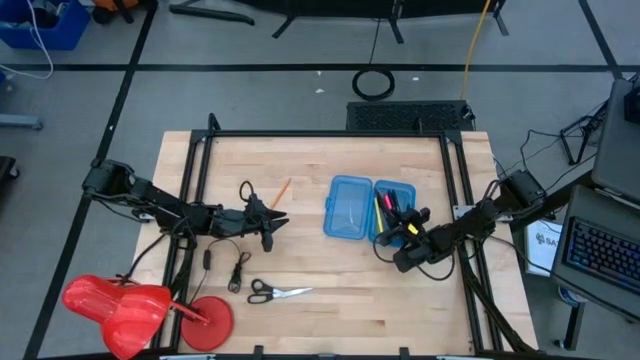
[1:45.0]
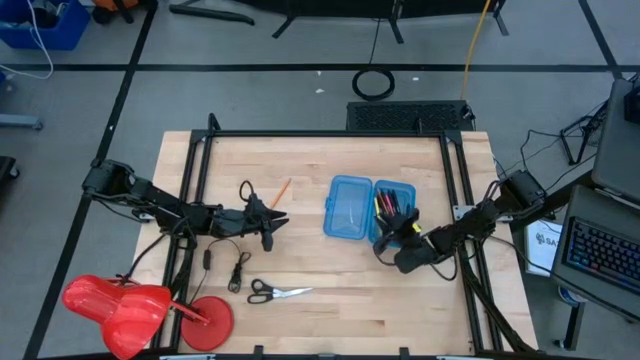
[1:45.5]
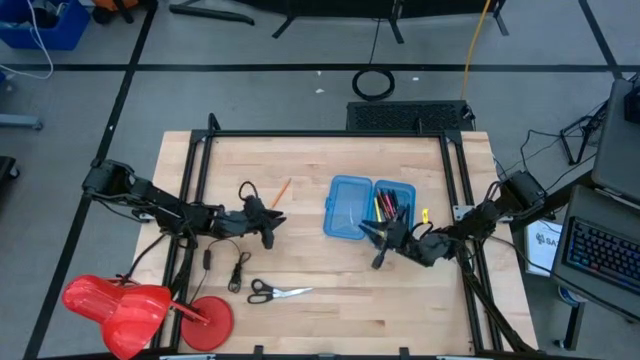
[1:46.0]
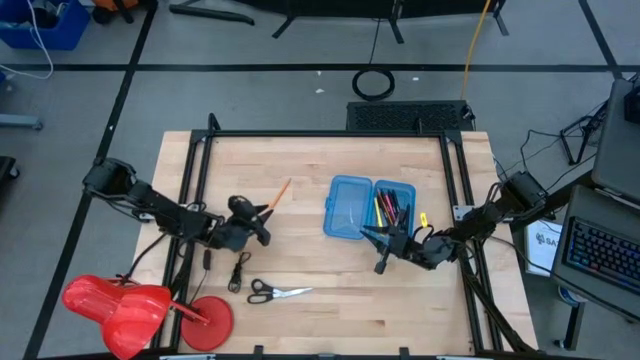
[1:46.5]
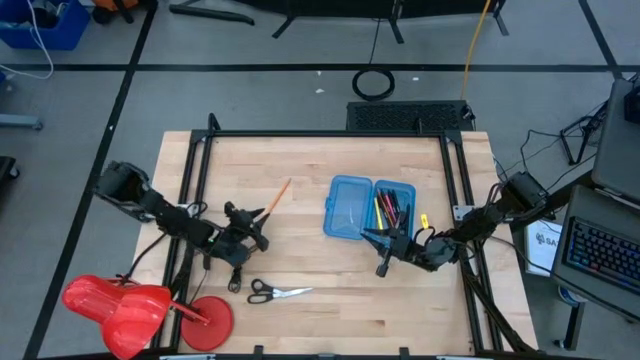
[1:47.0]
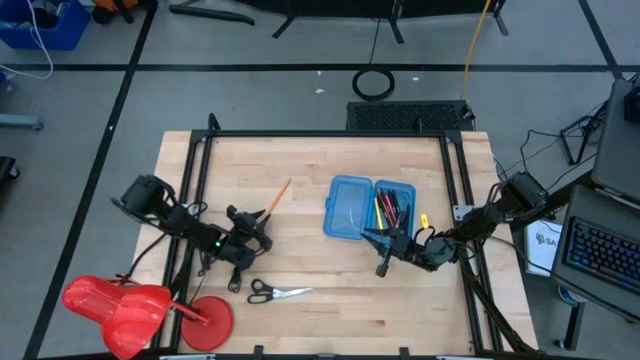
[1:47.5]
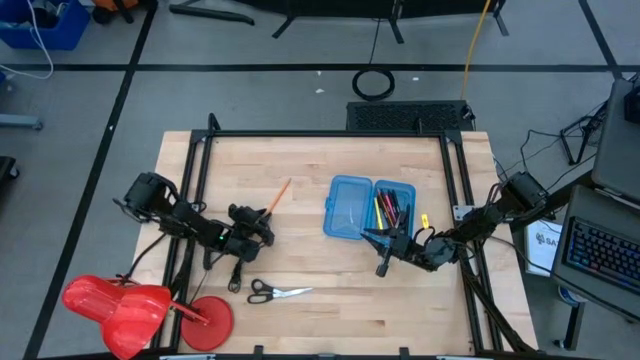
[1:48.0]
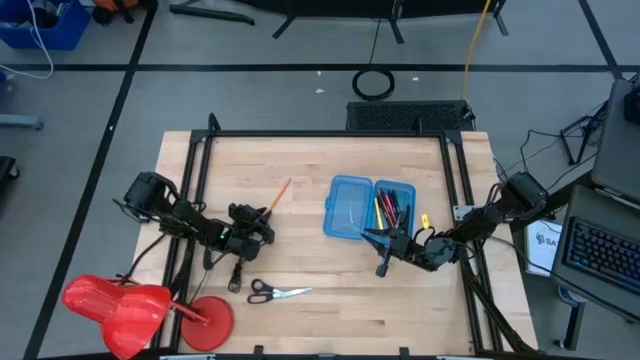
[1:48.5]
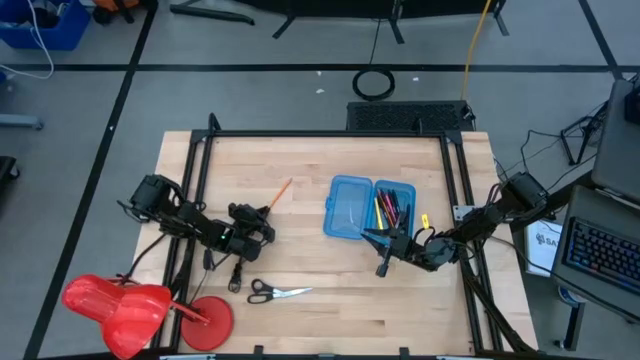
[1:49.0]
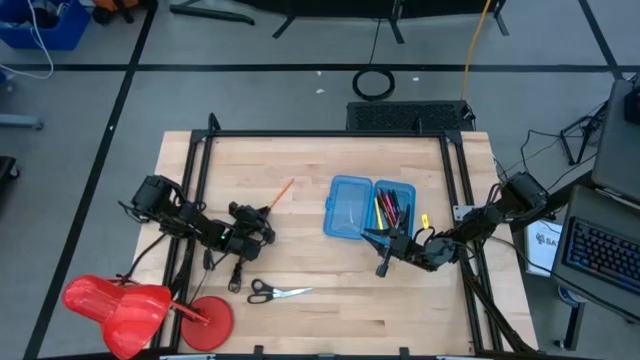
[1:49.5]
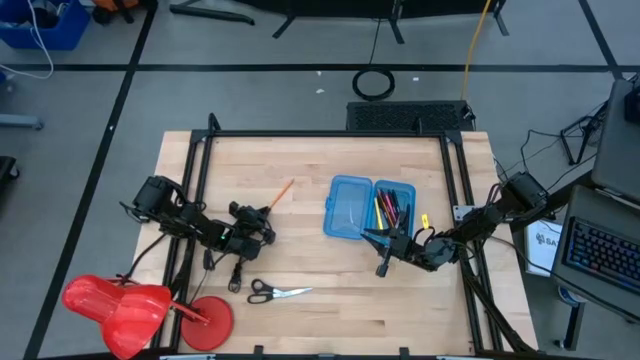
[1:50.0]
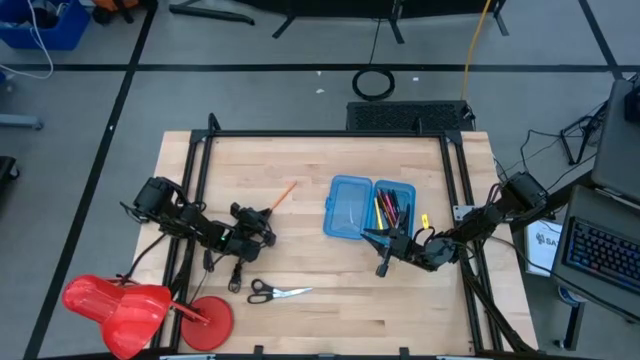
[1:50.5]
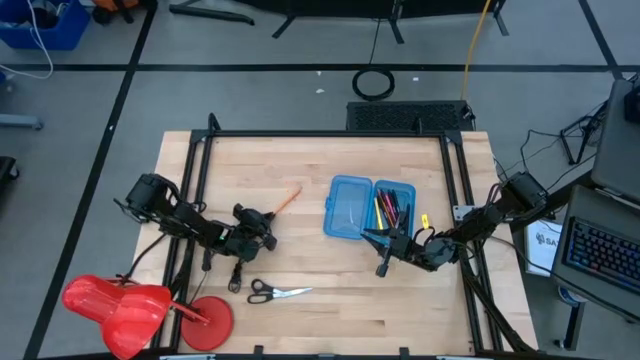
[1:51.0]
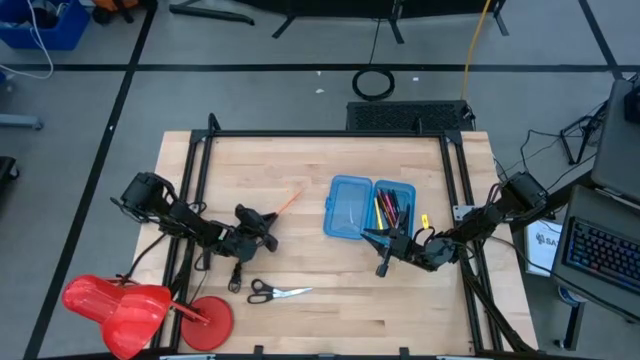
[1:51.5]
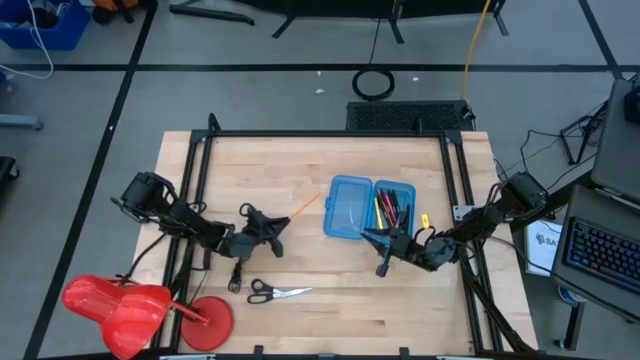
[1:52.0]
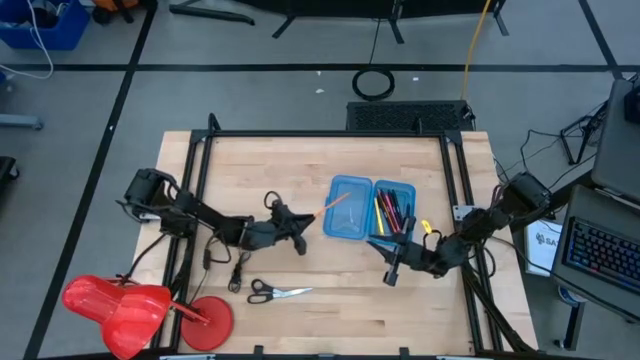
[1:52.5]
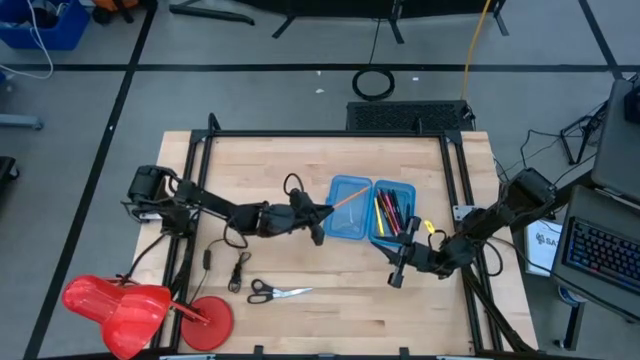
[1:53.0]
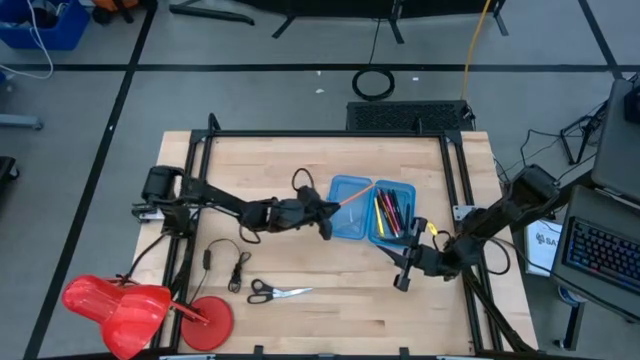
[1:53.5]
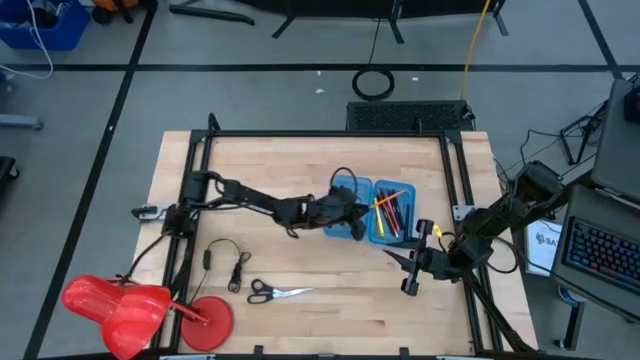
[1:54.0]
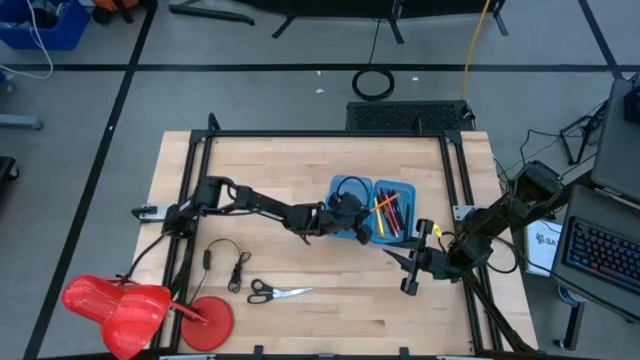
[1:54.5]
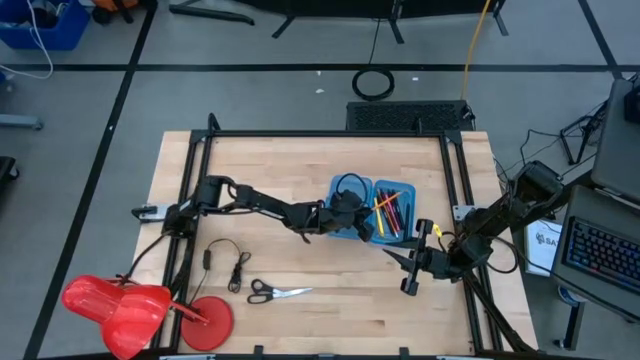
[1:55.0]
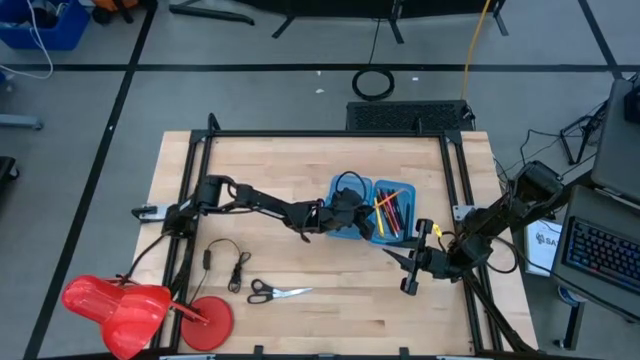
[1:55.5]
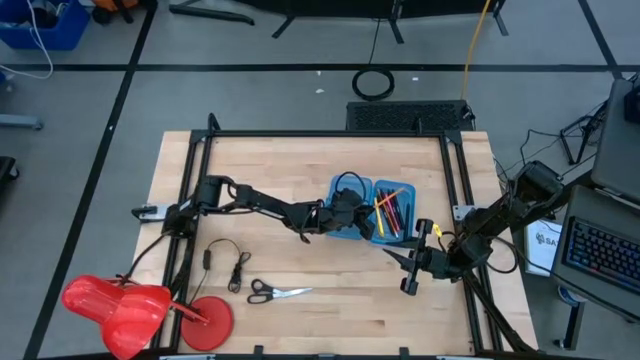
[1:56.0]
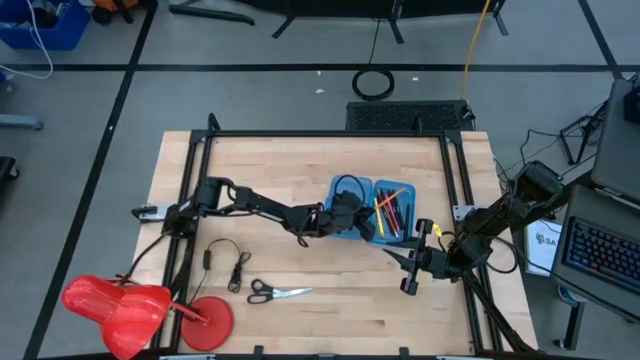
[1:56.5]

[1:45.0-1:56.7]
Task: Pick & place school supplies into a supply box
Put the orange pencil into the blue supply box

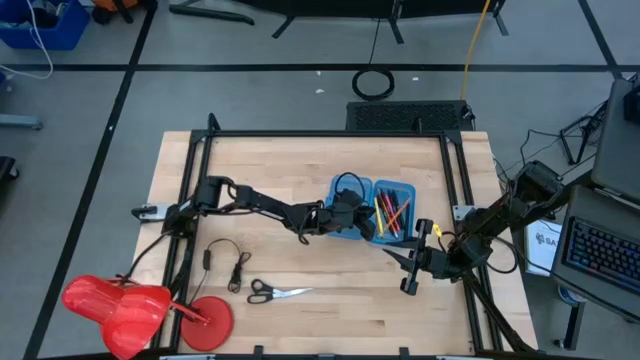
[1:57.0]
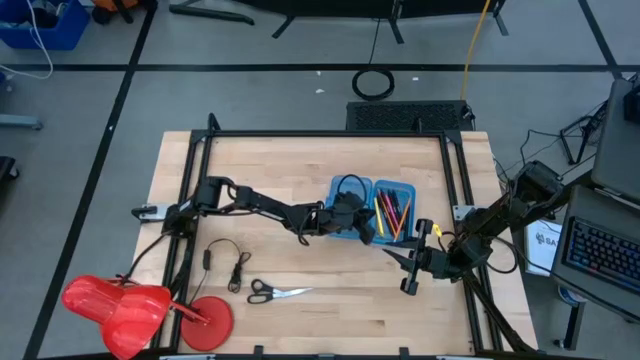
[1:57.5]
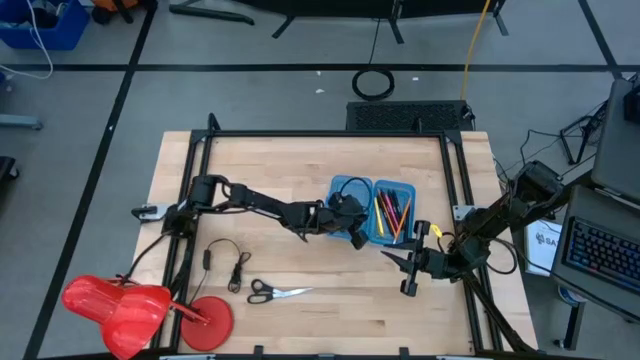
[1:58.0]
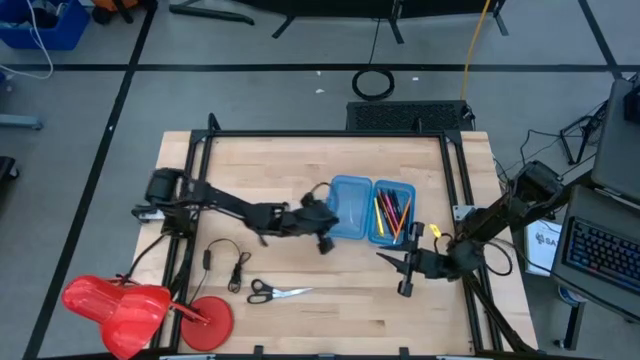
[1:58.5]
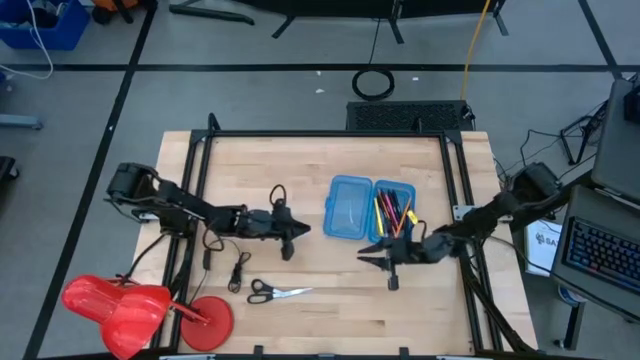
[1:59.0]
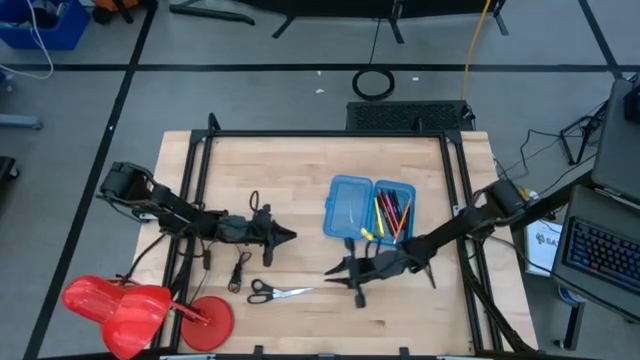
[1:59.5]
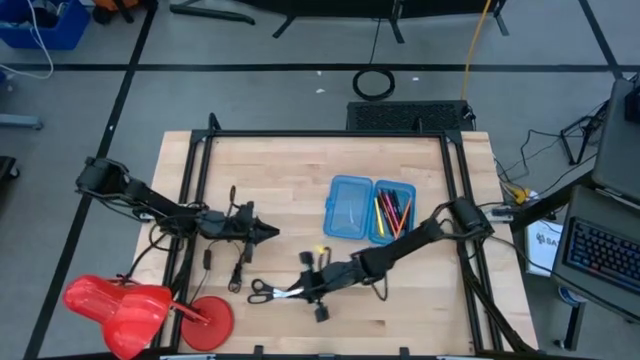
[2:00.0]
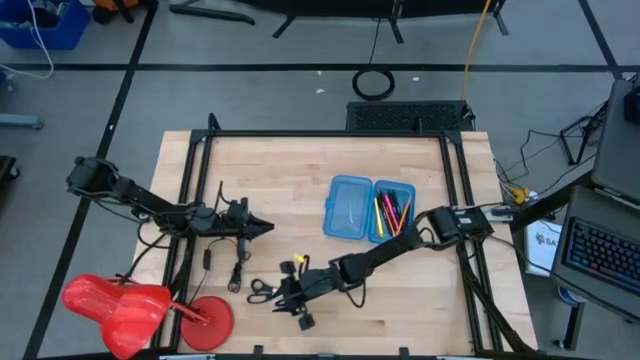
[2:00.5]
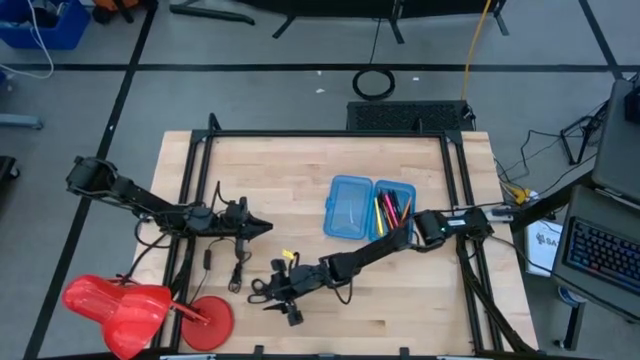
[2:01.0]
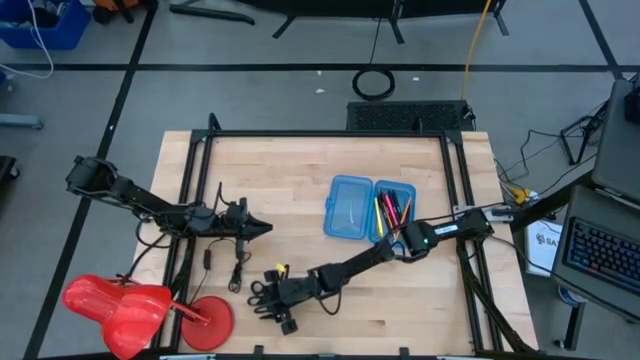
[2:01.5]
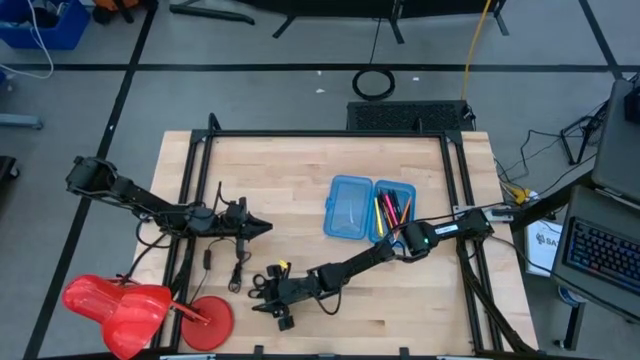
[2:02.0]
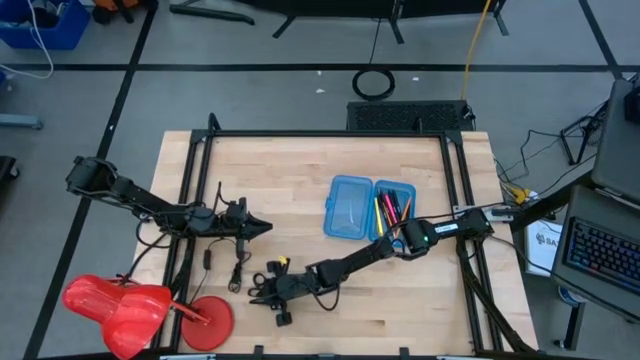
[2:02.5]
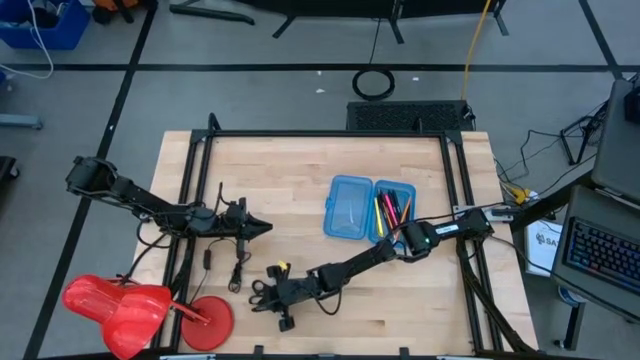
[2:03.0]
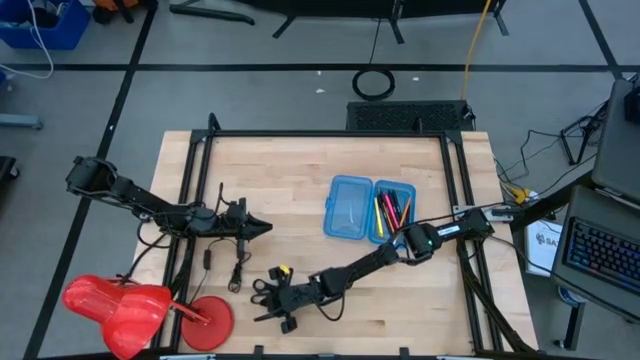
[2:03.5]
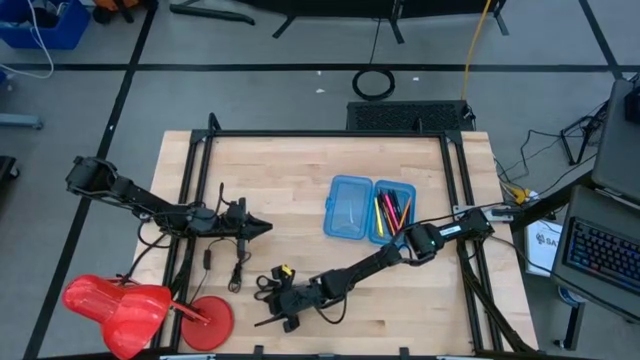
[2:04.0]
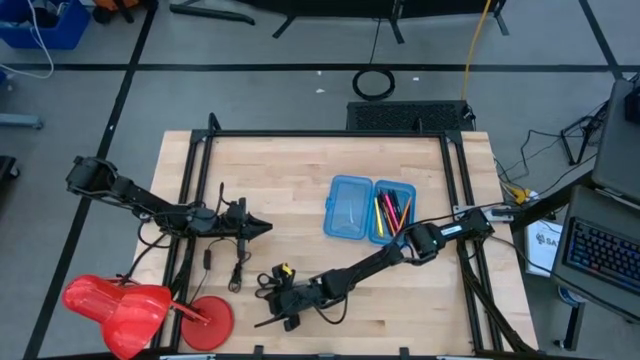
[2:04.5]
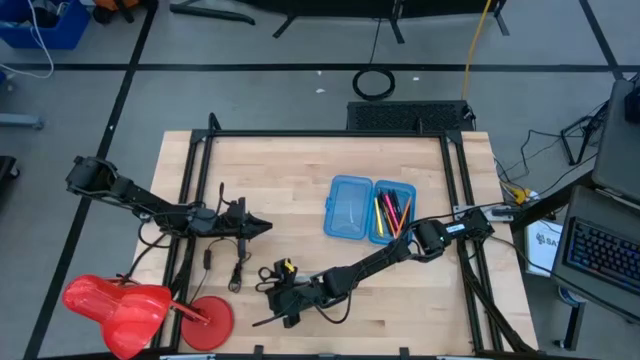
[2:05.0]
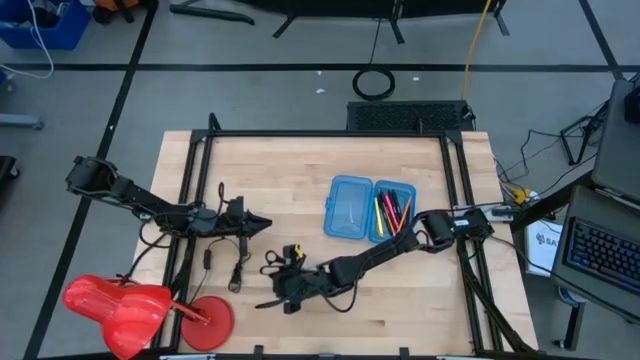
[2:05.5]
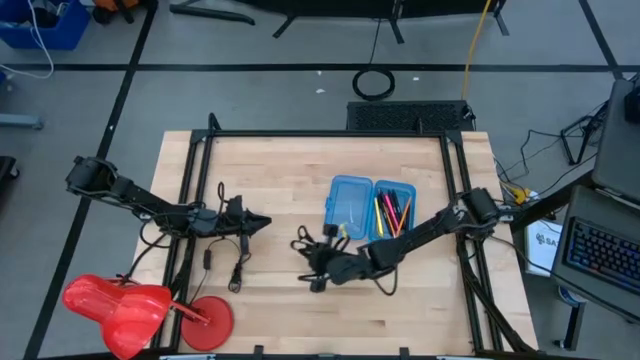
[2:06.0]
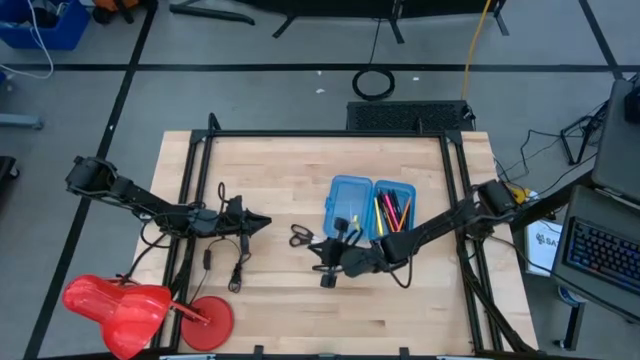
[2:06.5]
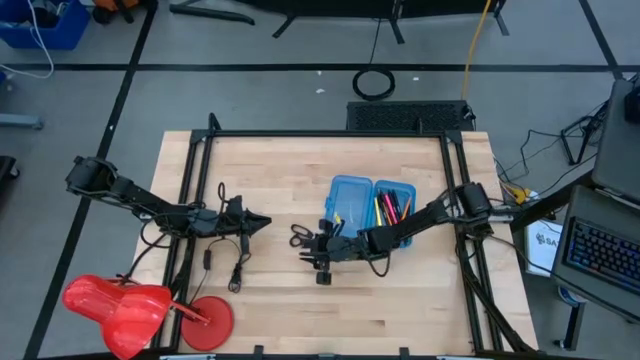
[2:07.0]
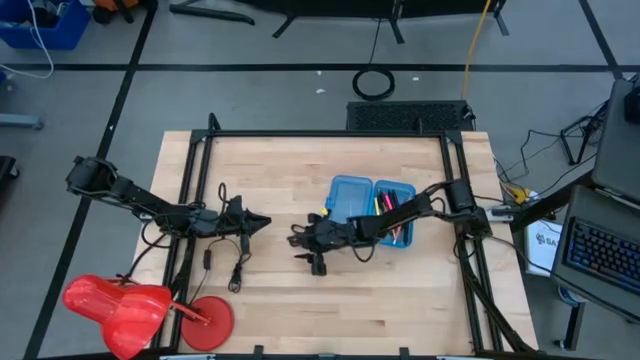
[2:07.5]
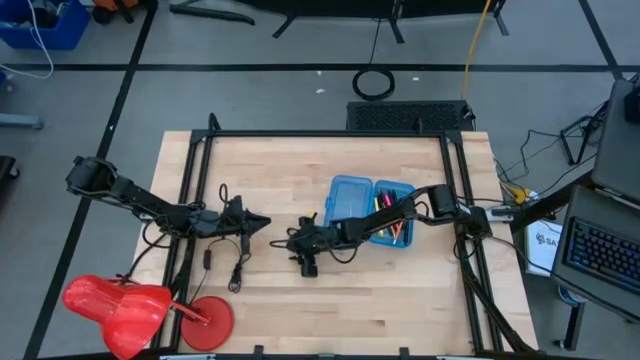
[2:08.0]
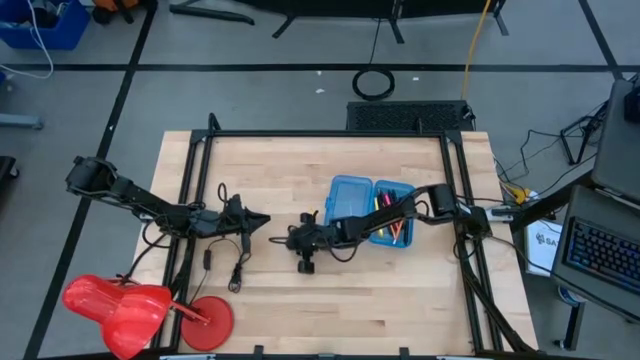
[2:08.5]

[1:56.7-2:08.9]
Put the black scissors into the blue supply box
